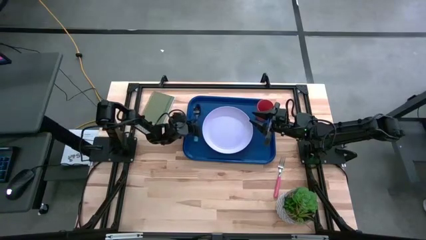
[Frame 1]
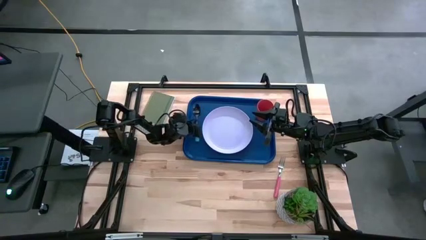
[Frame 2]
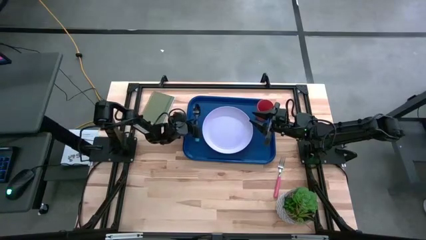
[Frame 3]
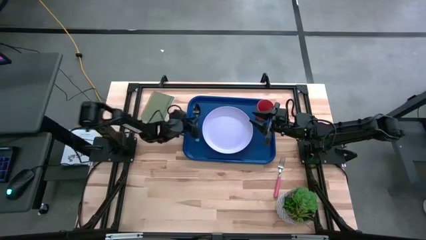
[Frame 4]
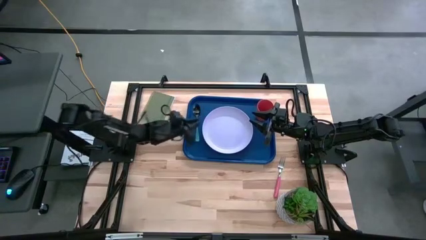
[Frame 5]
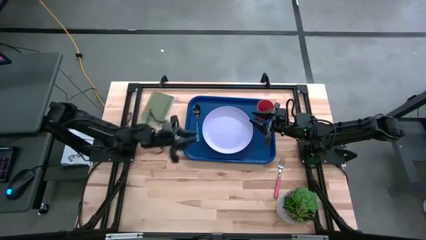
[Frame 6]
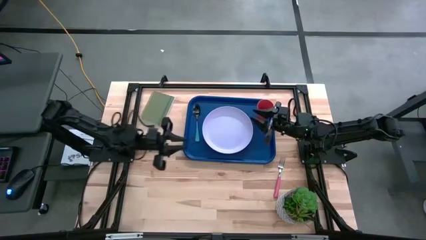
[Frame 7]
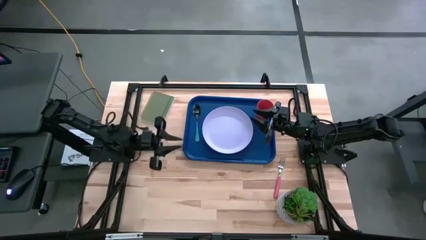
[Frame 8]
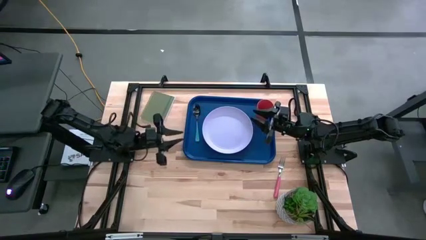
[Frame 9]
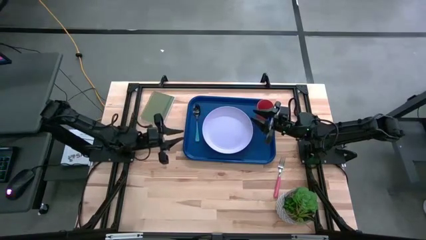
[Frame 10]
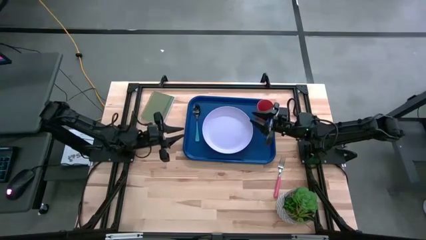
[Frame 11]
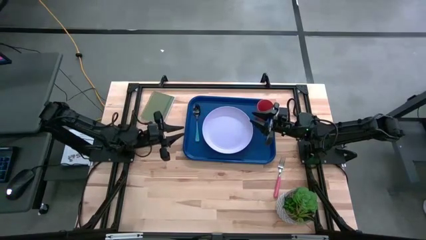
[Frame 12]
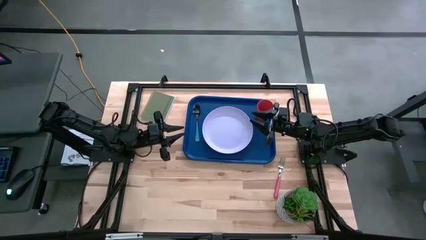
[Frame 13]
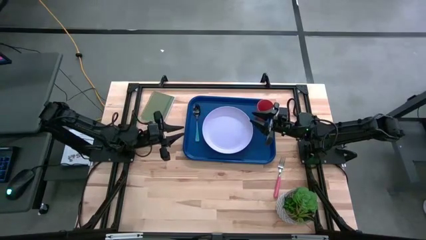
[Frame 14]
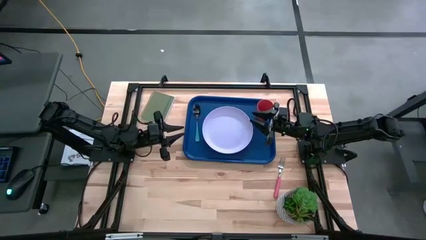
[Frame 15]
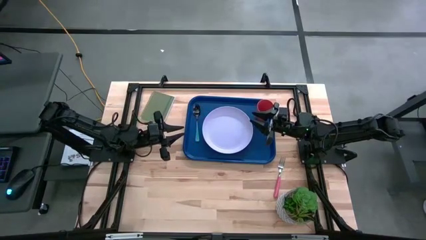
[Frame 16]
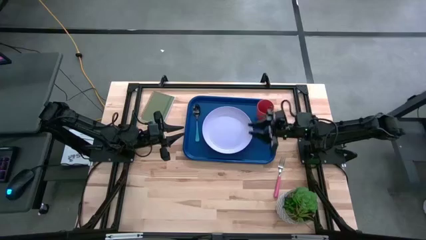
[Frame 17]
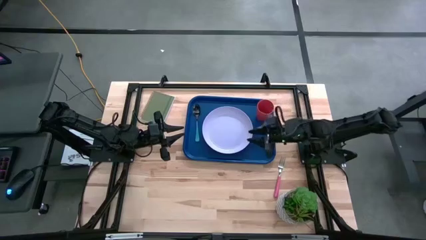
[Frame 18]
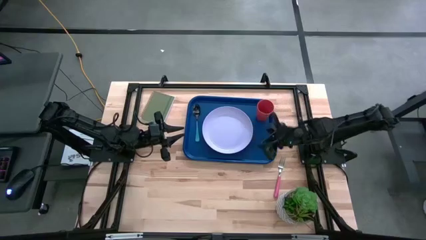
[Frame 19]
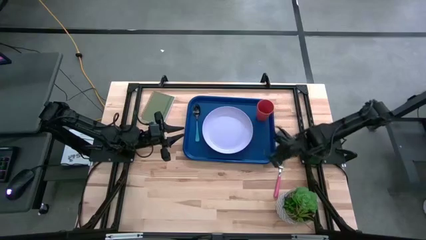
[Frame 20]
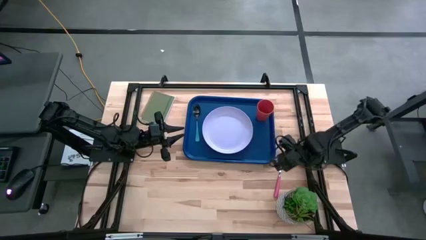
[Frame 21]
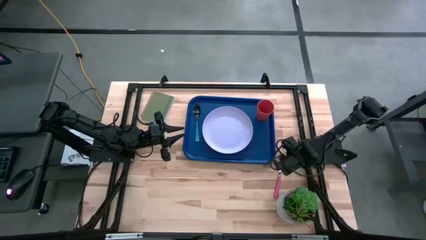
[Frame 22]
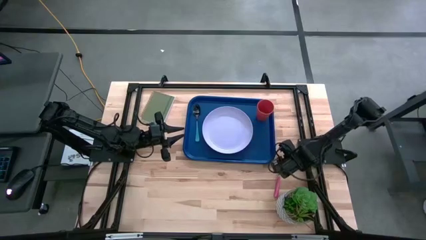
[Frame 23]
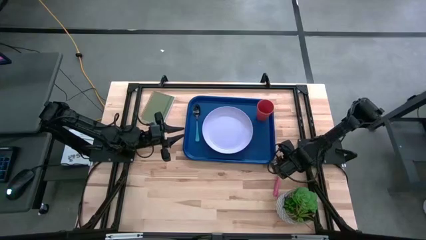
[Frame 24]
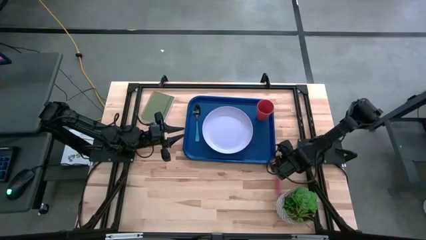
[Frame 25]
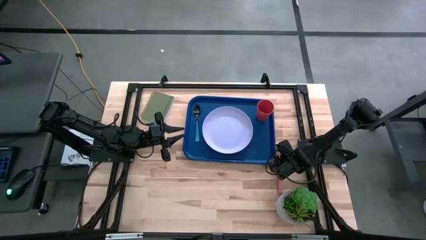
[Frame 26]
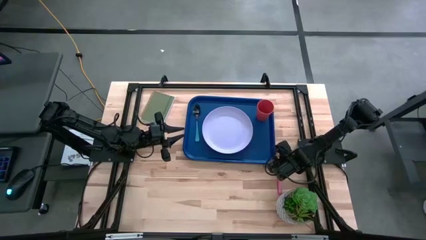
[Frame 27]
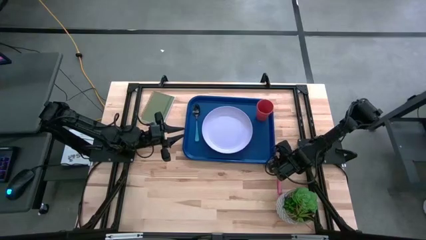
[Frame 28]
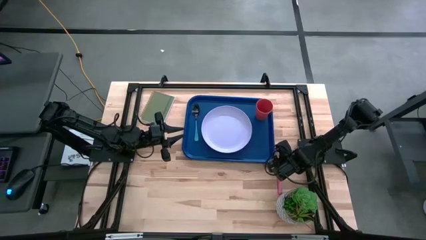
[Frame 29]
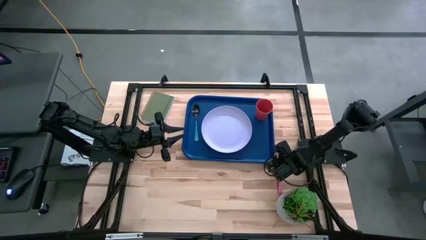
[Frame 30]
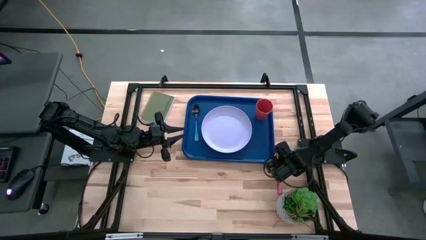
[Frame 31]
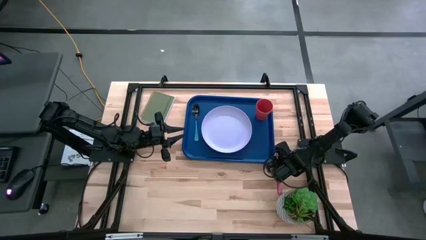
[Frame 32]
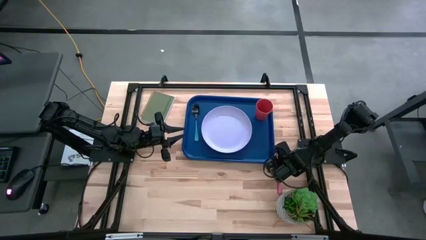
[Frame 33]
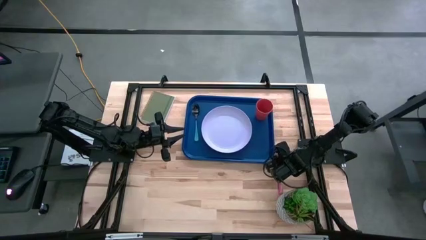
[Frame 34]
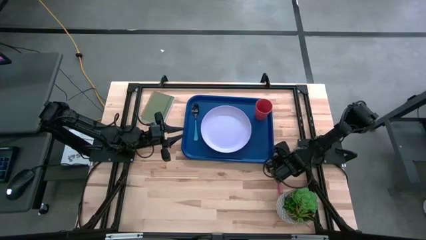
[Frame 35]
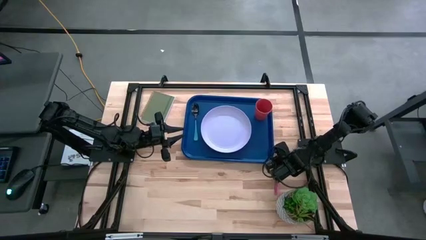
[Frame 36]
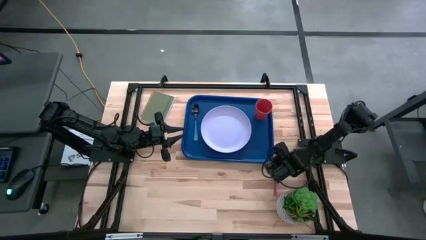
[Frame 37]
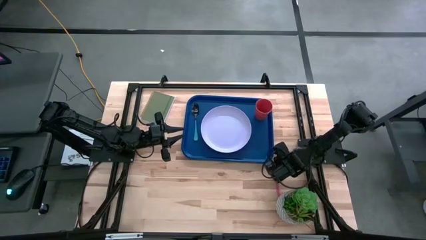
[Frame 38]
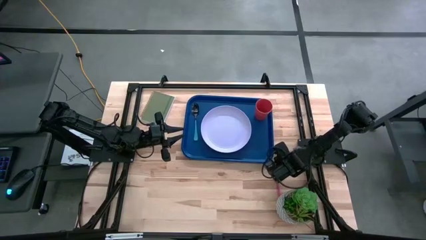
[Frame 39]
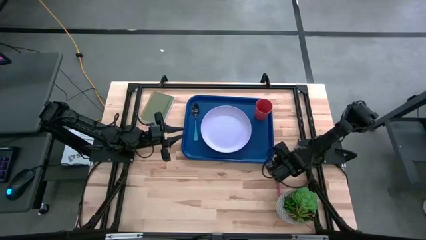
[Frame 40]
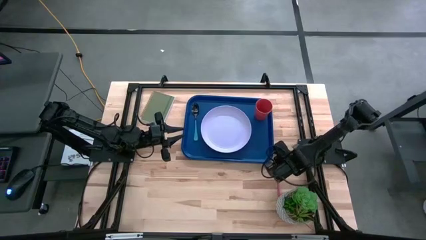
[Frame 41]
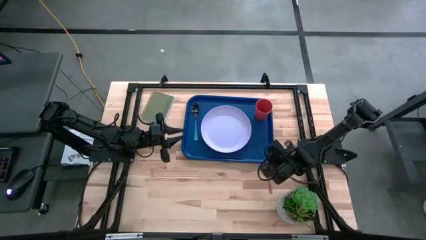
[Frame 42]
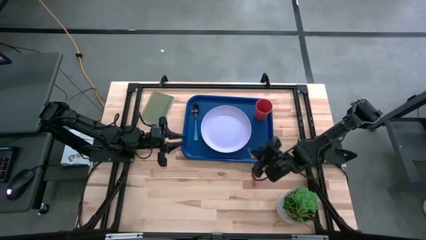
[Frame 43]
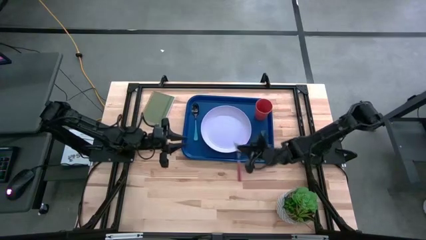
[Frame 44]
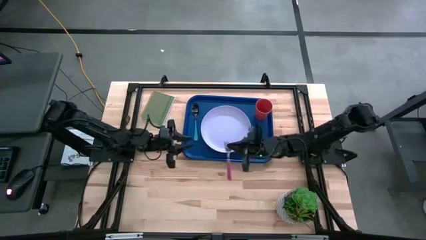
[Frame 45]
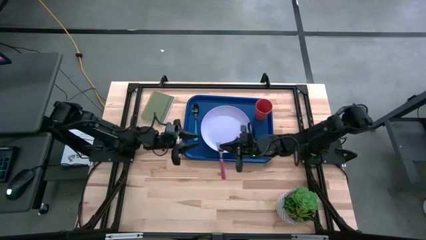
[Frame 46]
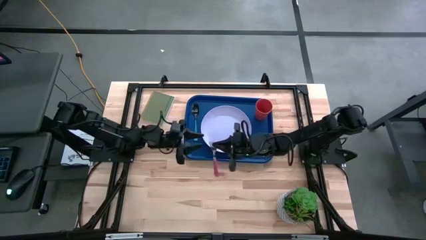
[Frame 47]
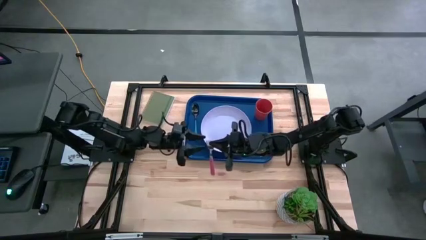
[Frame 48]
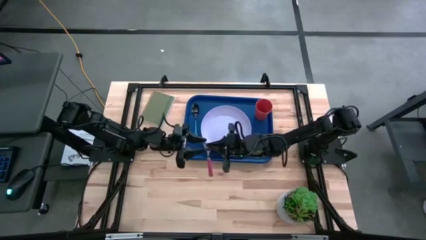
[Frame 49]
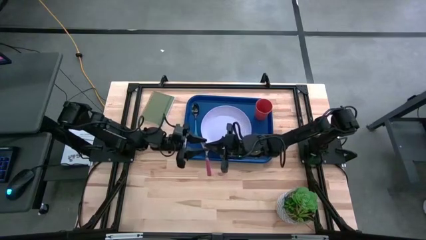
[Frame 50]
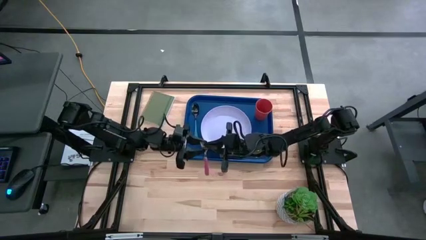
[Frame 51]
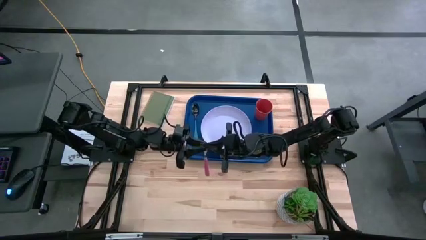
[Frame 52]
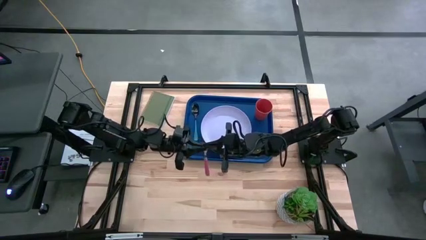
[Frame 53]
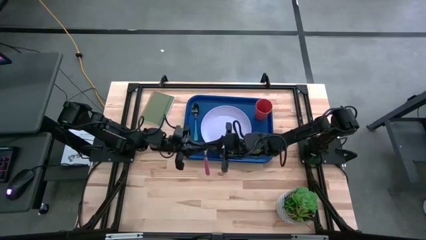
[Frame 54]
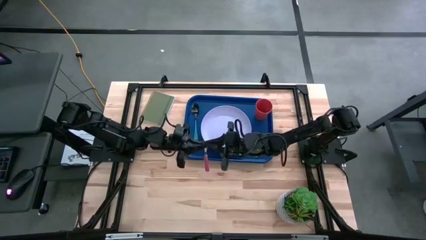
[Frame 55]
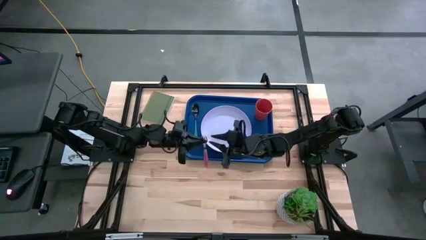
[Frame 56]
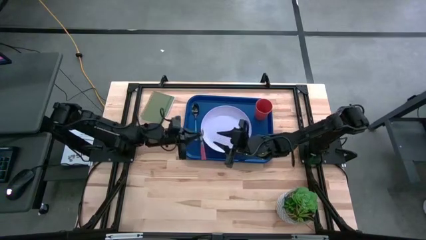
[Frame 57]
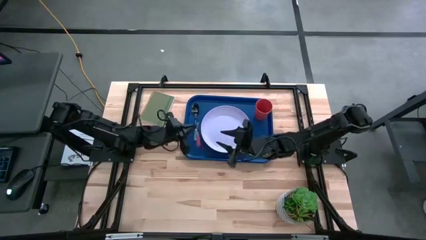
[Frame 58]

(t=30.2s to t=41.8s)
Task: Pick and place plate/cup/fork/spoon on tray
Put the pink fork on the blue serving tray to the left of the white plate

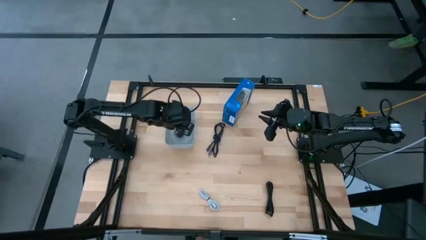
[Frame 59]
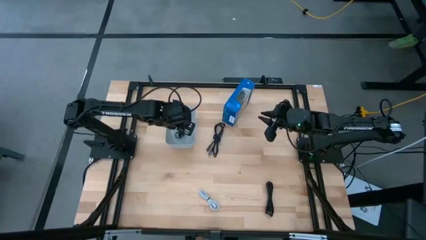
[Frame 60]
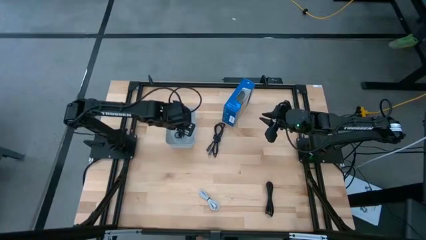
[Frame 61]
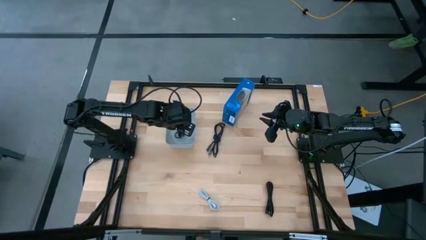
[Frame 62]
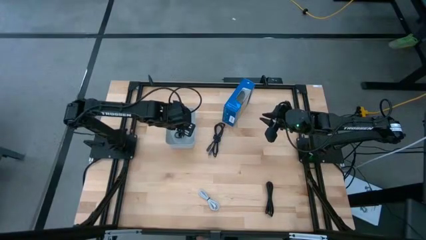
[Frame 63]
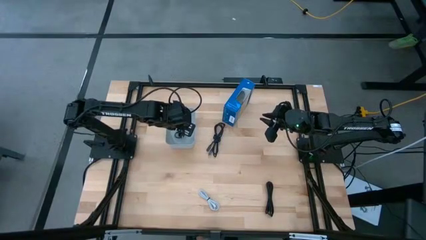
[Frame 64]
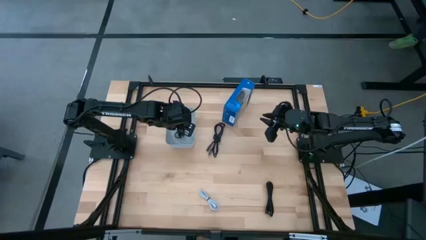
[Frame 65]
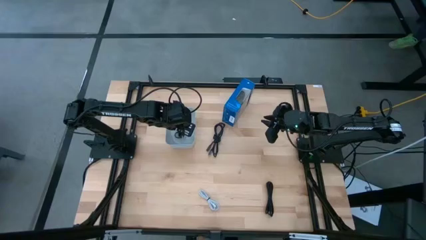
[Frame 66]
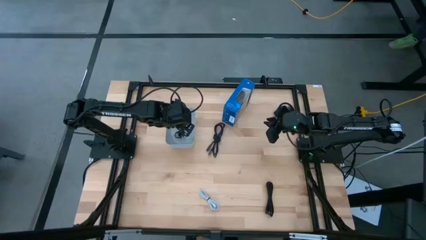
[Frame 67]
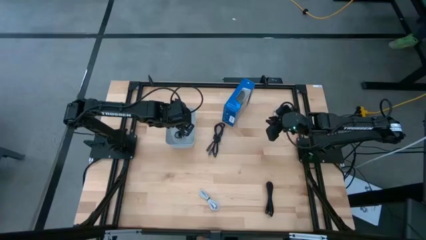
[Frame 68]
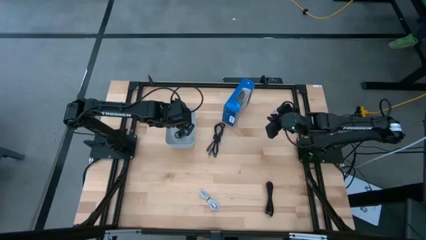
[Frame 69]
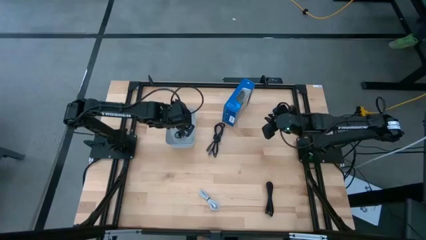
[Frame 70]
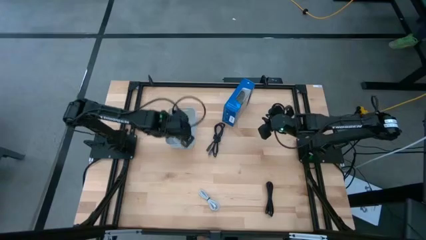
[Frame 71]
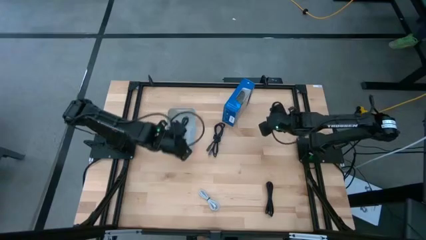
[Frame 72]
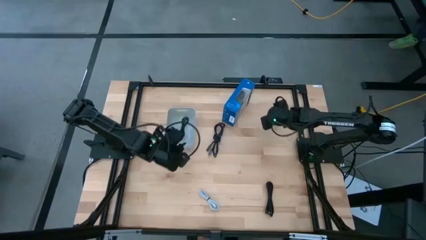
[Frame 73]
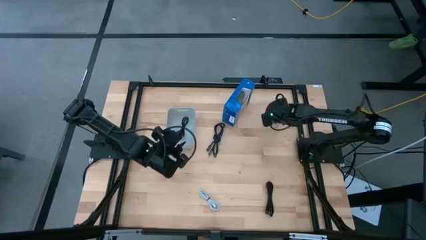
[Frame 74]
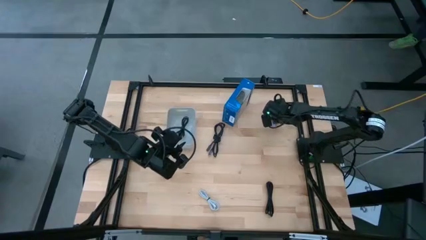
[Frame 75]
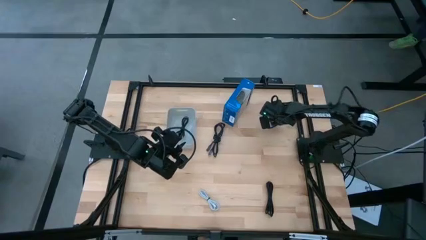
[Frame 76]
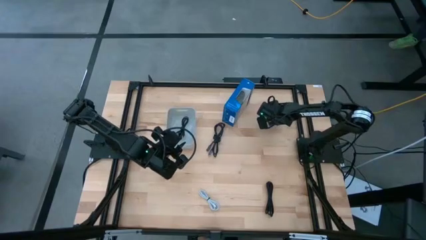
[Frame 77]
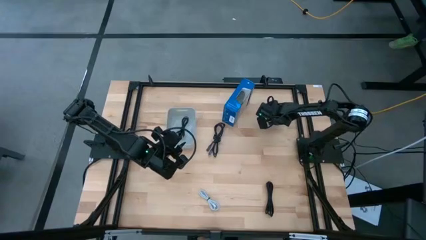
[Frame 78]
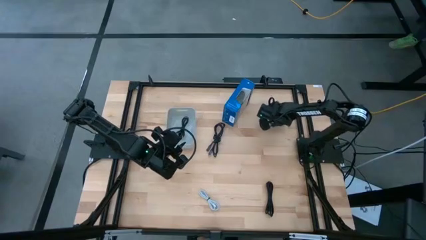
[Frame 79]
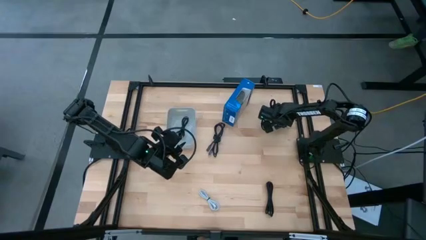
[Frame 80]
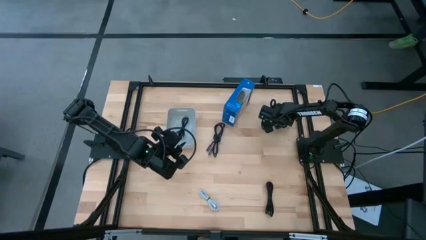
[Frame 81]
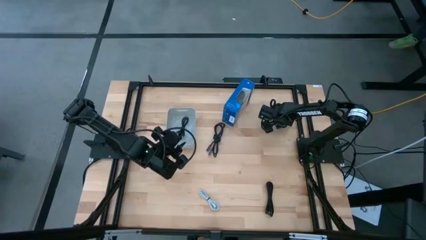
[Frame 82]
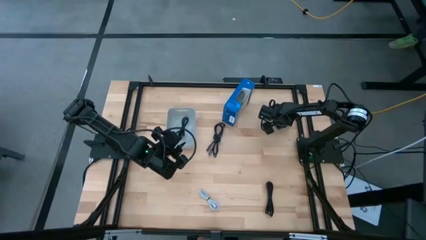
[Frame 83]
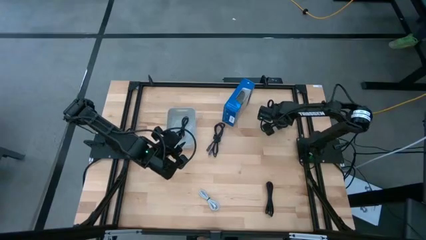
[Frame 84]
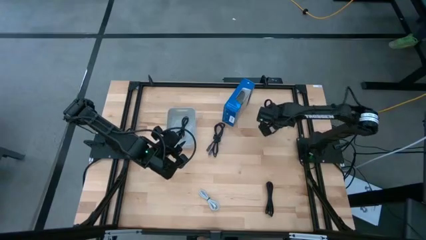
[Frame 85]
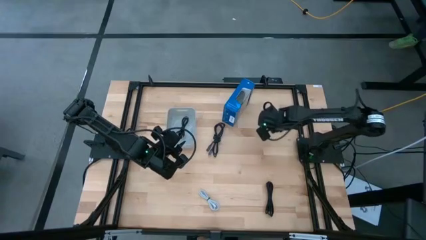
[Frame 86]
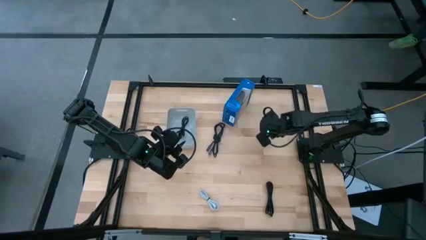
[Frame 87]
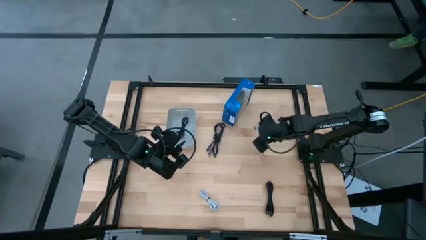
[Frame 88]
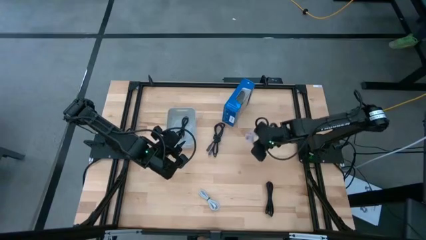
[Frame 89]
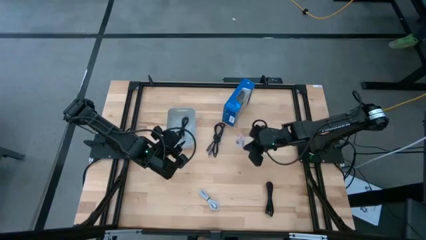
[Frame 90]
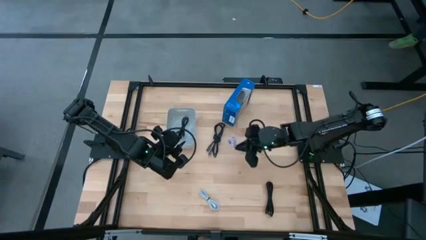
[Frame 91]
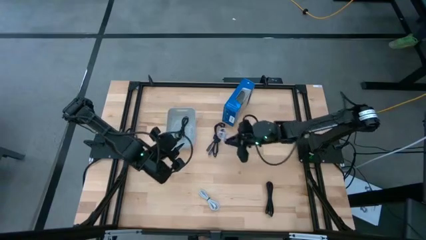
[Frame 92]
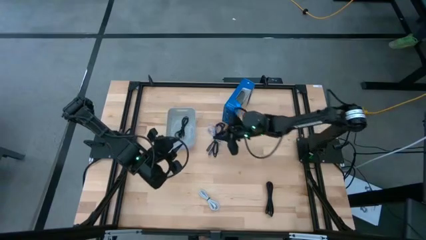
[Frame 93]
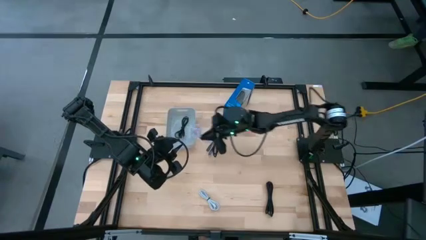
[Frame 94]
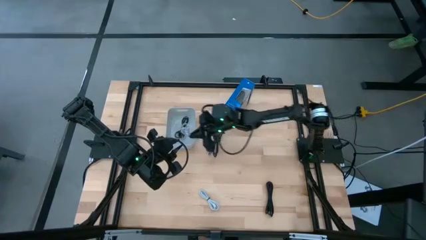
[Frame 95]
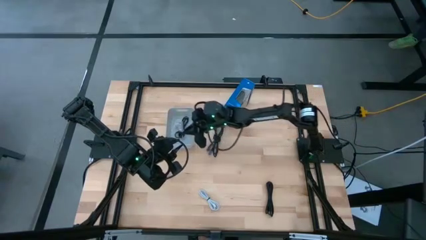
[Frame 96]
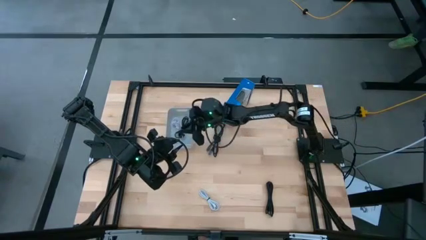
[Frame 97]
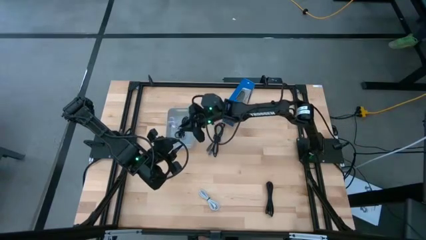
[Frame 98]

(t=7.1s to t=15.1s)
Task: Pick and place USB-C Cables
Put the purple charger cable into the white bin
